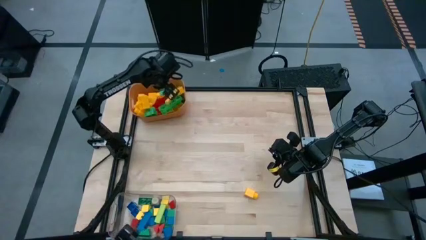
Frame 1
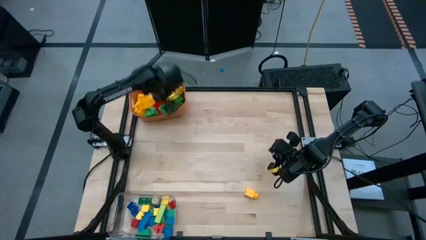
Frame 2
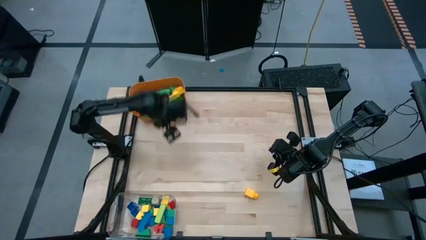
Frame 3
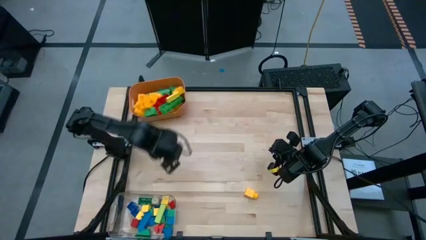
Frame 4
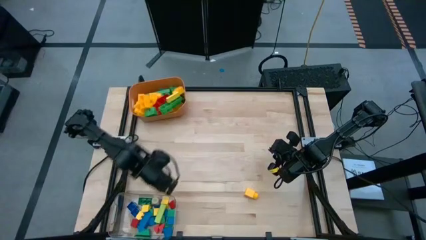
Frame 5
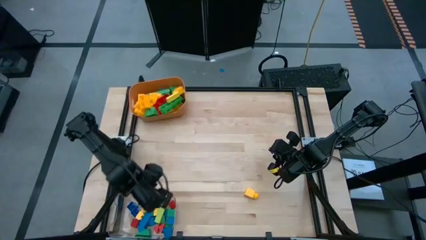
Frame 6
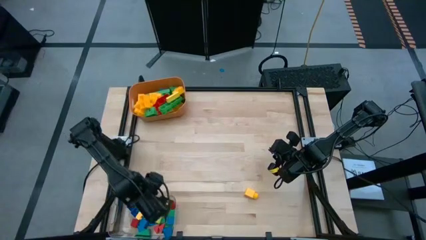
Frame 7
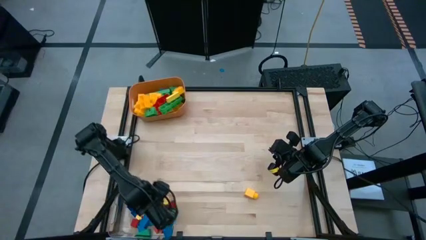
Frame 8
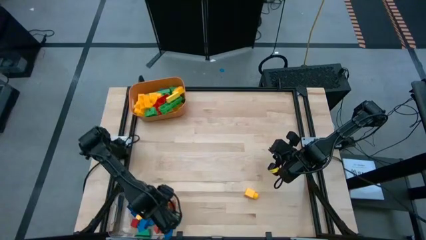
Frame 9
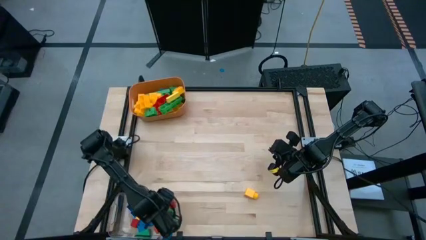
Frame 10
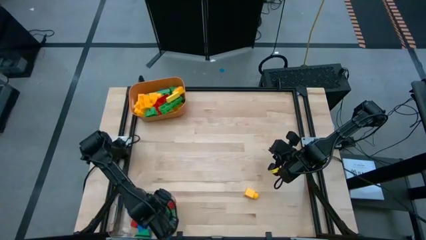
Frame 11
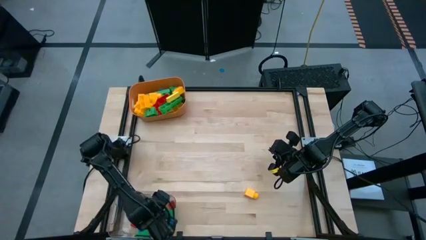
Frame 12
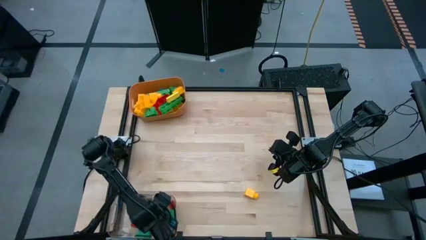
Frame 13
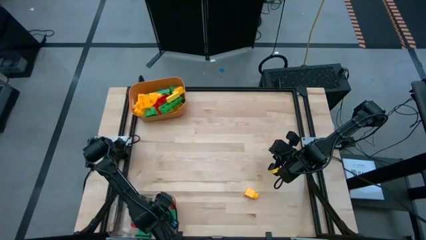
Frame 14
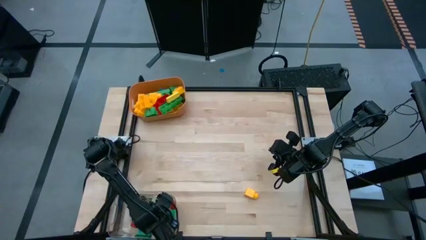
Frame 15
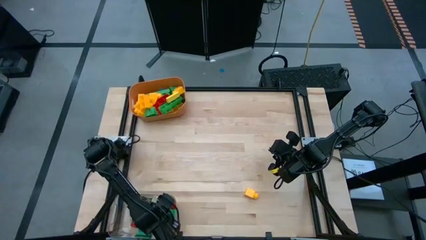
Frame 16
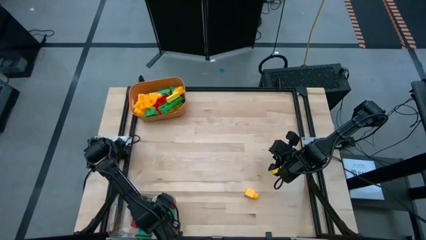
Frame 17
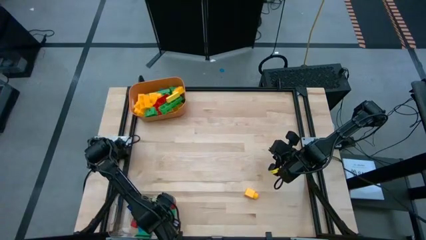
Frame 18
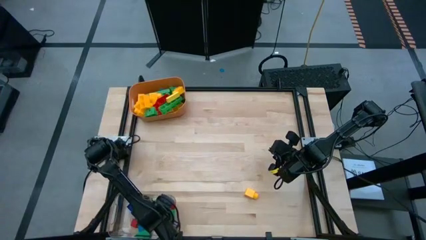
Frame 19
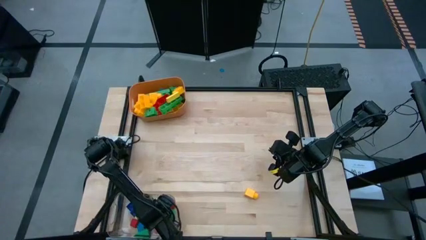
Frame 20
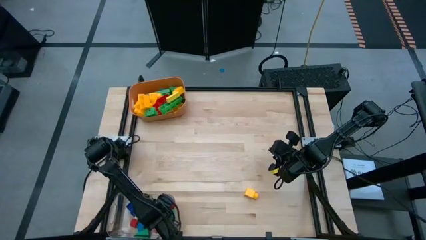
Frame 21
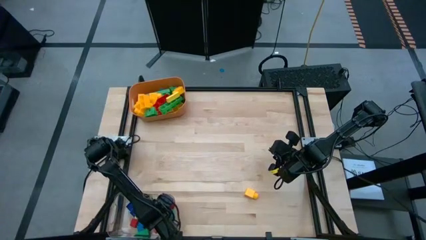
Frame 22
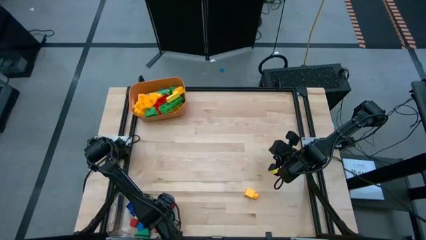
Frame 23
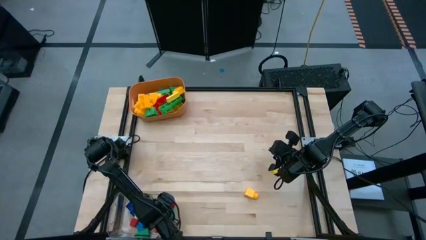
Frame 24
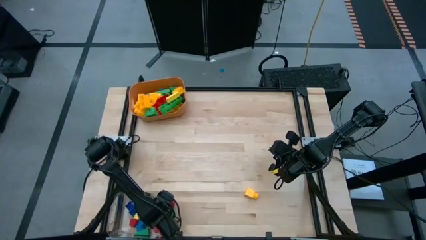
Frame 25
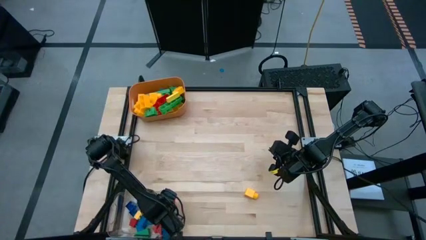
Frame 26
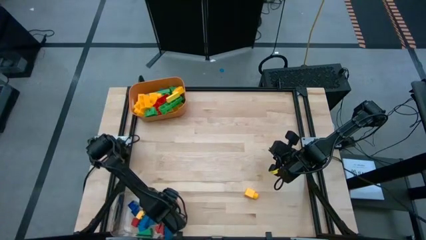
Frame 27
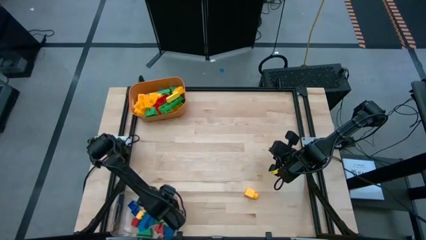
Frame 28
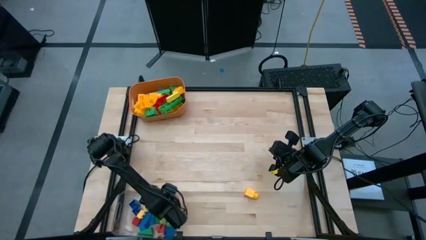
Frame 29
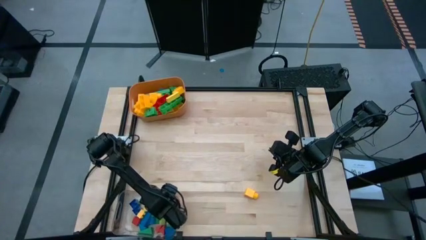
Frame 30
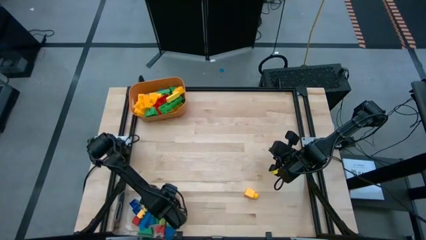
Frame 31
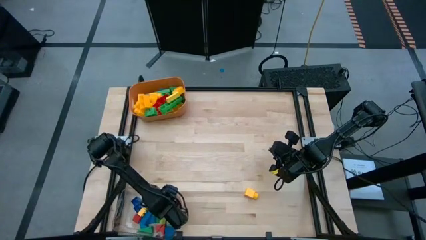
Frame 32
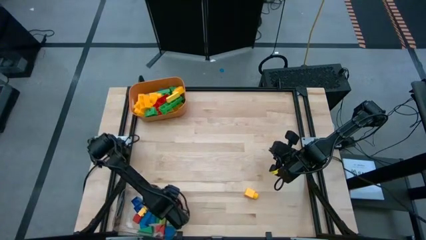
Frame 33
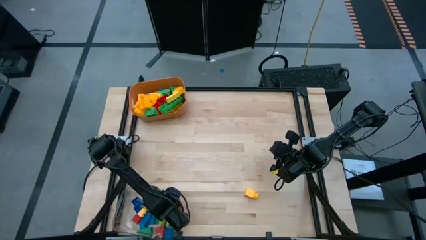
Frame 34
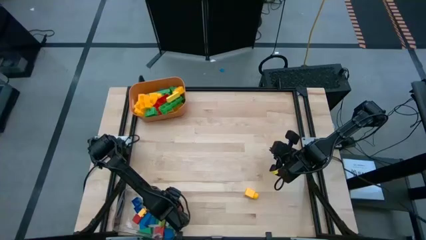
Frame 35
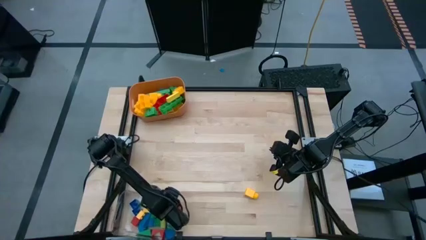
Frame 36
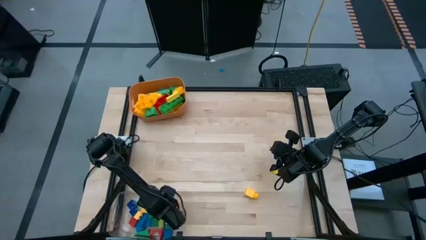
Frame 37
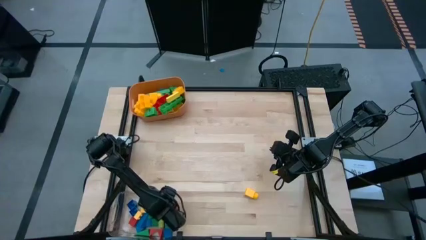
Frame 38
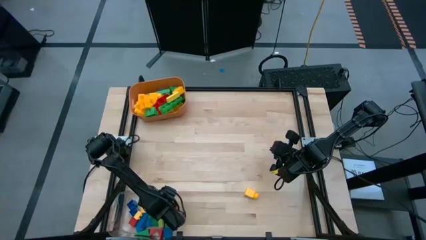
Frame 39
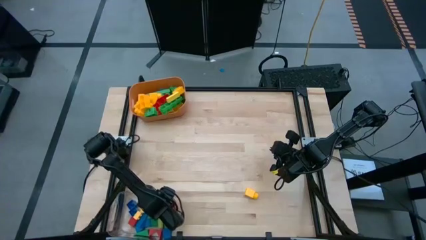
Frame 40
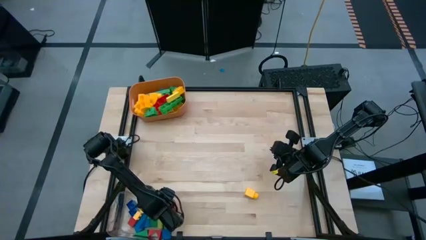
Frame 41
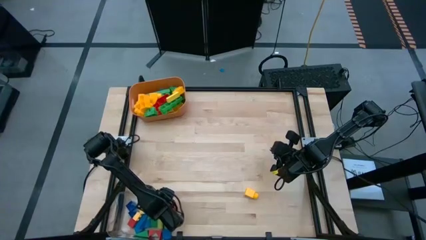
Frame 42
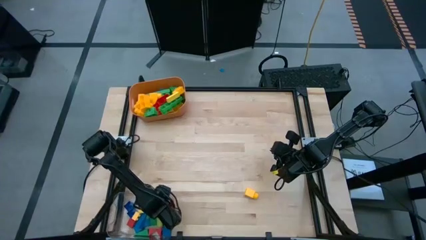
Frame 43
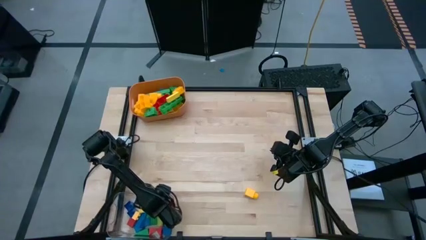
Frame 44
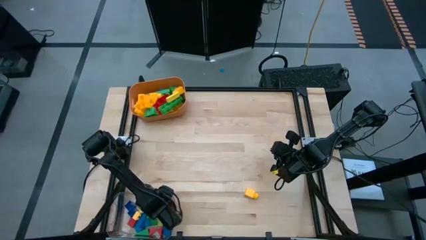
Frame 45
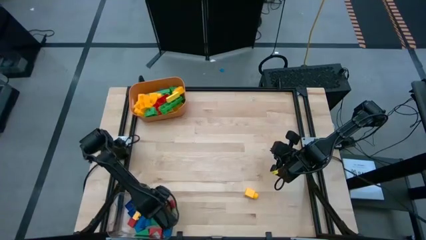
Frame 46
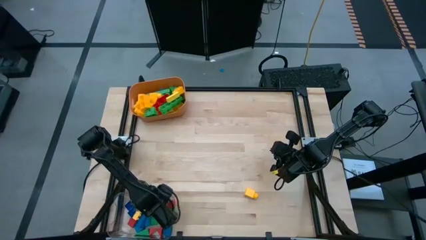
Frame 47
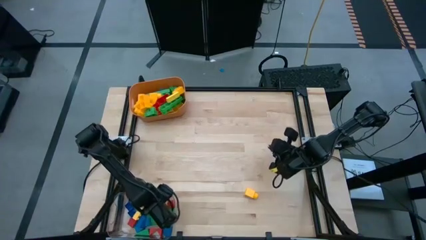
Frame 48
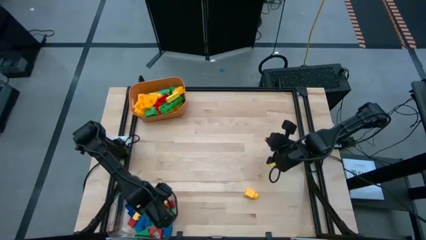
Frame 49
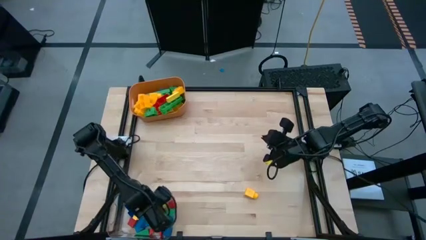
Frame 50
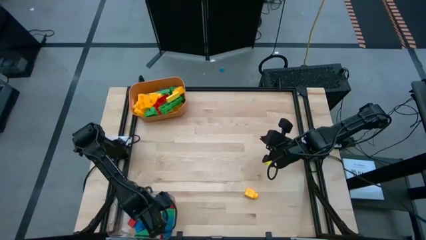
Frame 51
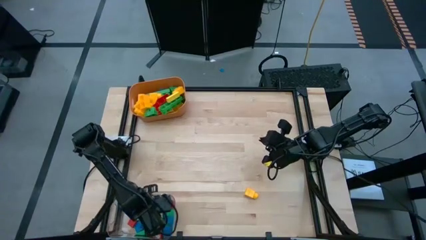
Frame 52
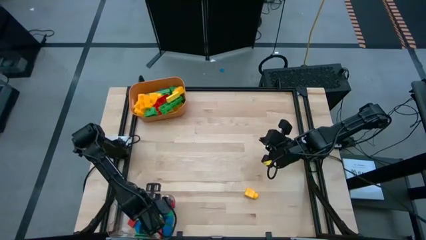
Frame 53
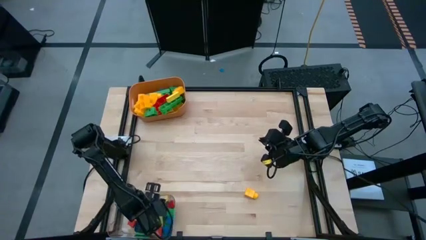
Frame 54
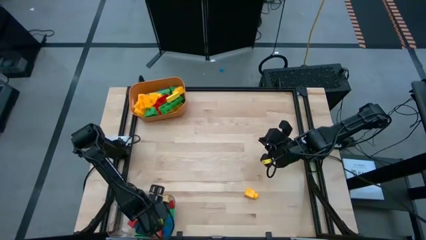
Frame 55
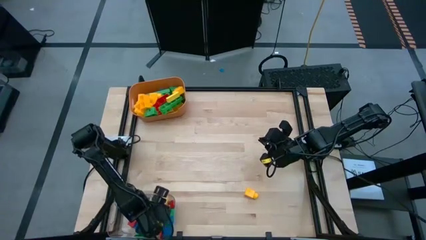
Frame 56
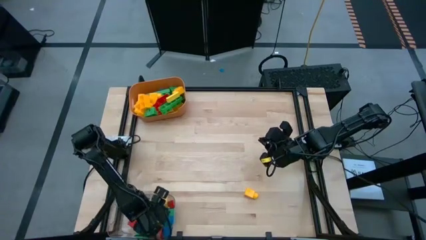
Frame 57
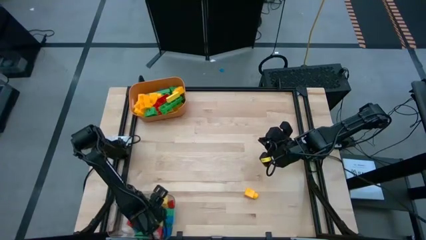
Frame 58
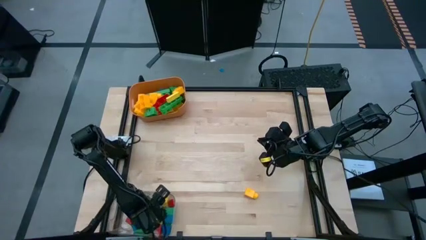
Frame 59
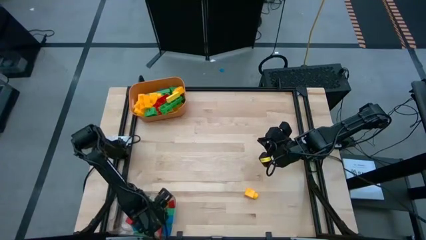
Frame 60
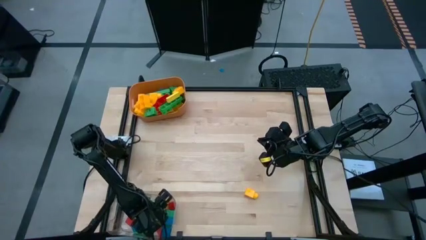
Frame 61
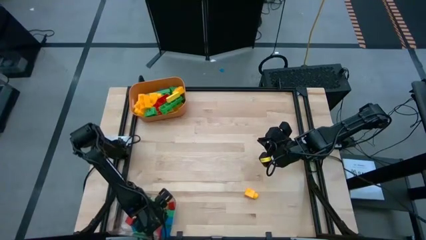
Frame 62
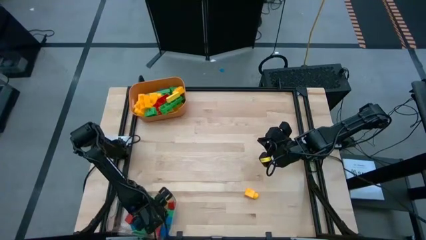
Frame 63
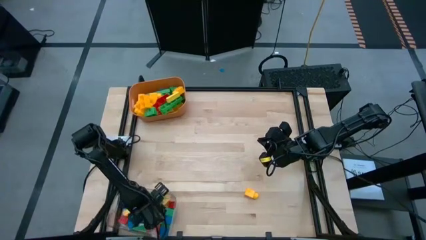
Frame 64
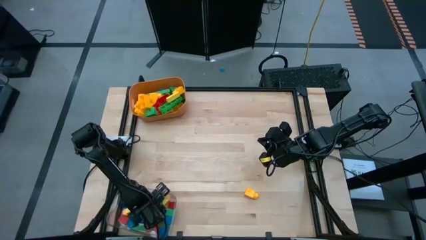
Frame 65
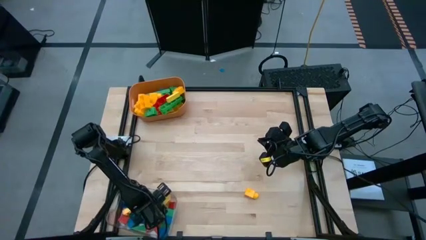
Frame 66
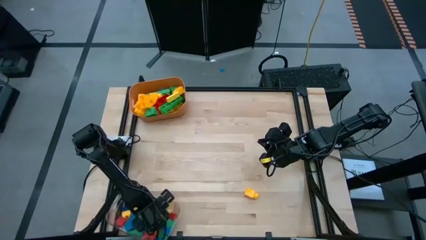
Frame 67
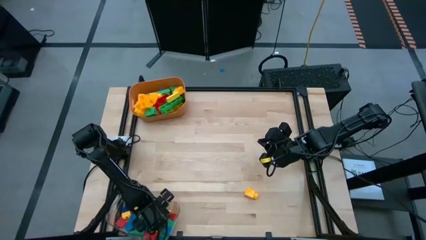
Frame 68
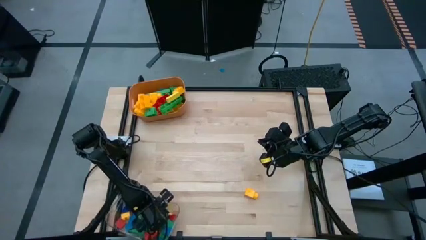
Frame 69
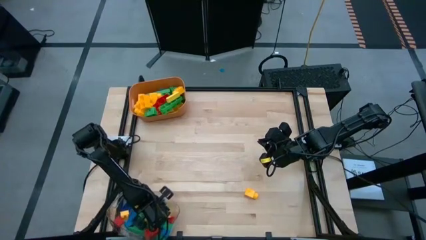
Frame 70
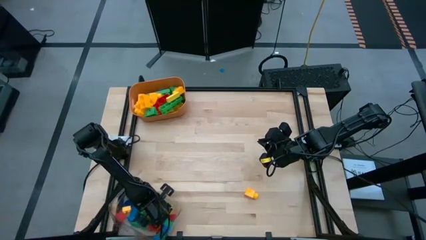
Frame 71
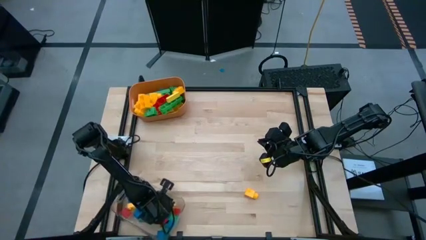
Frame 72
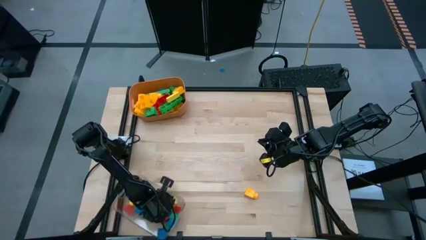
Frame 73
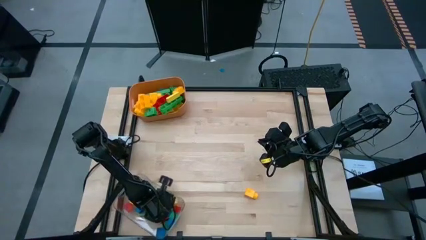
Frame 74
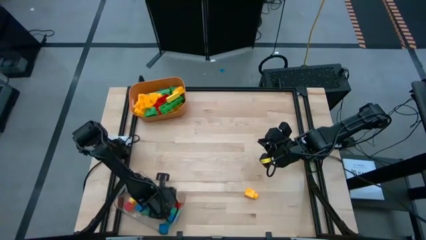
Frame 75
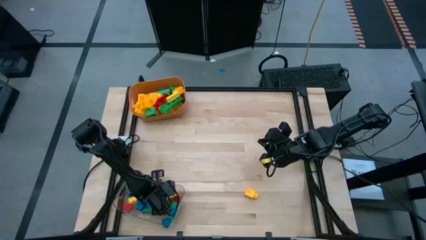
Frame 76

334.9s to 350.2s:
Task: Sort blocks by size
Put the big light green block into the orange bin
